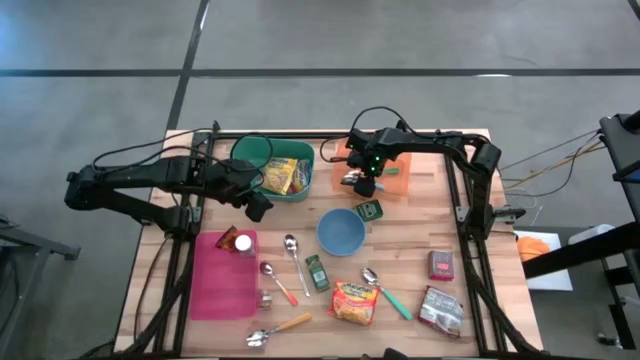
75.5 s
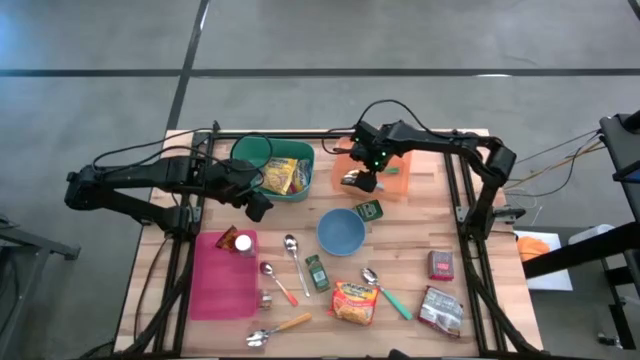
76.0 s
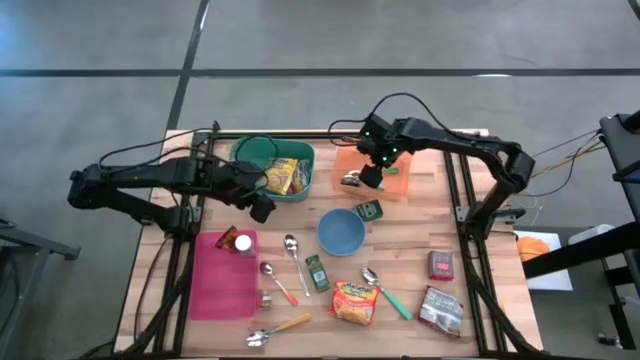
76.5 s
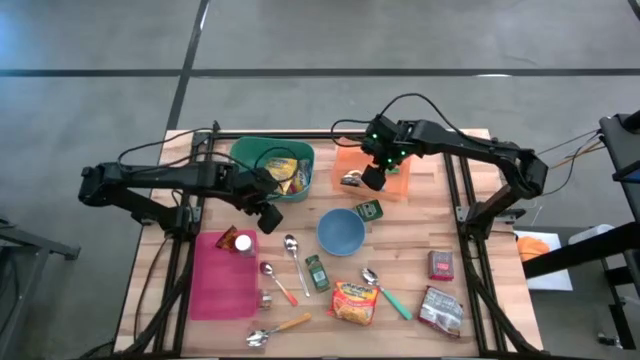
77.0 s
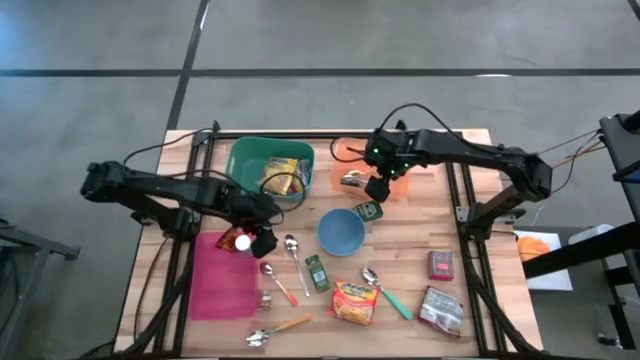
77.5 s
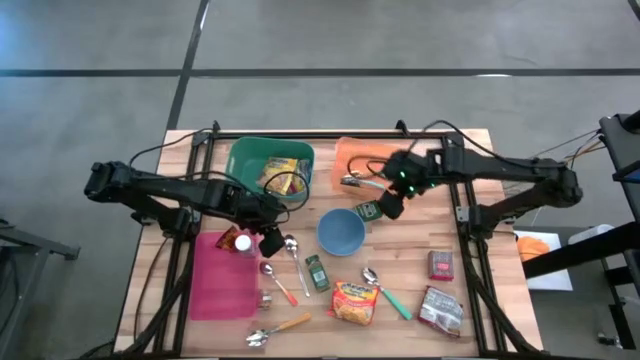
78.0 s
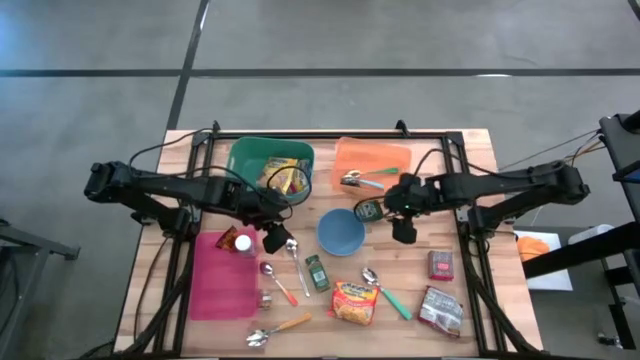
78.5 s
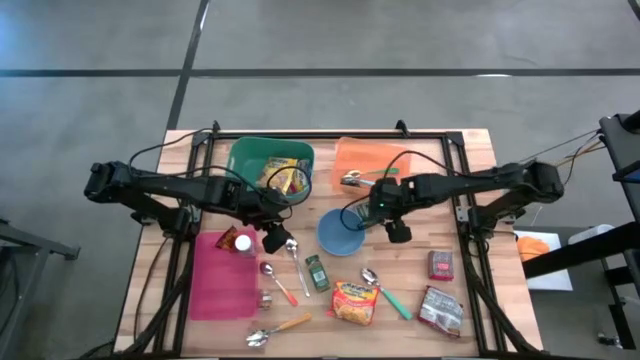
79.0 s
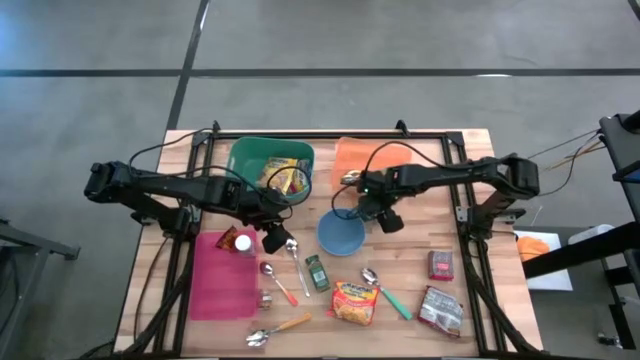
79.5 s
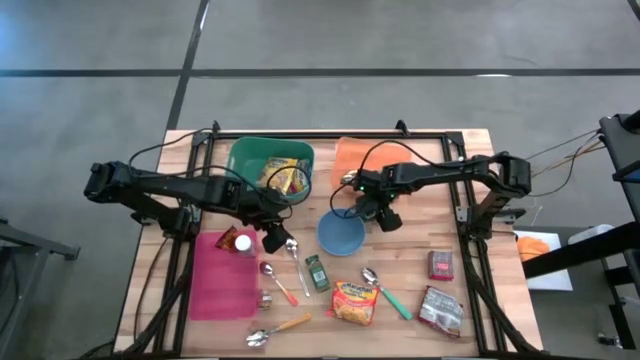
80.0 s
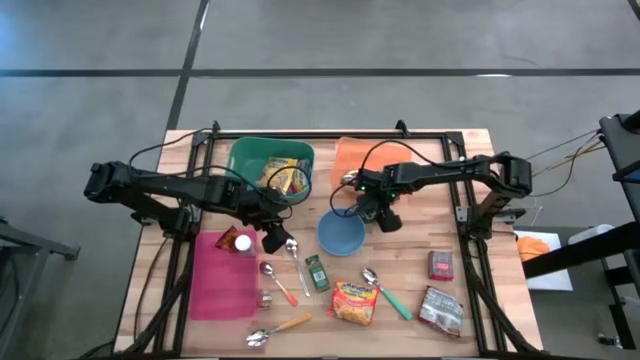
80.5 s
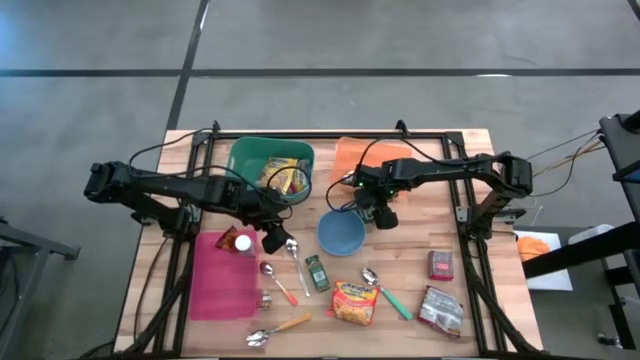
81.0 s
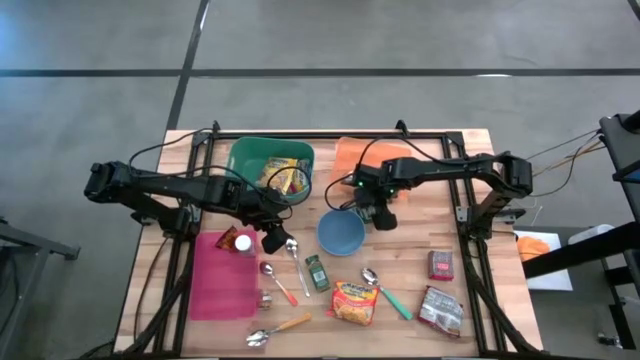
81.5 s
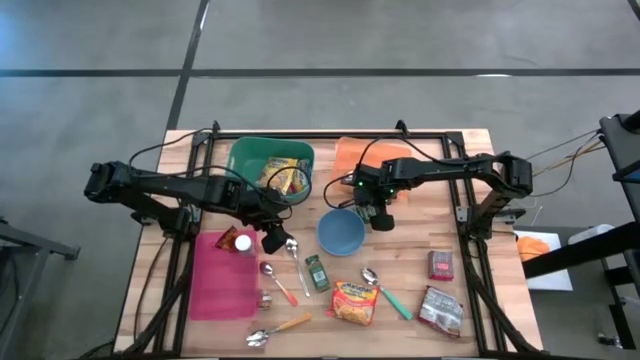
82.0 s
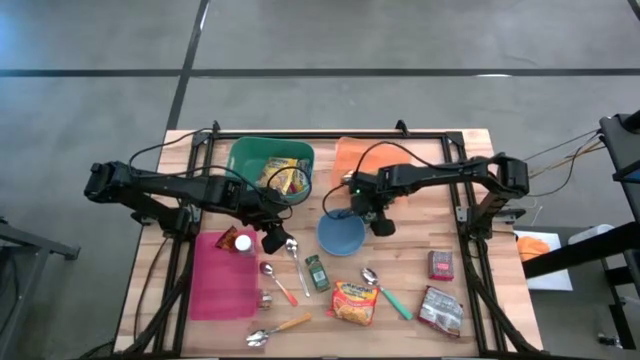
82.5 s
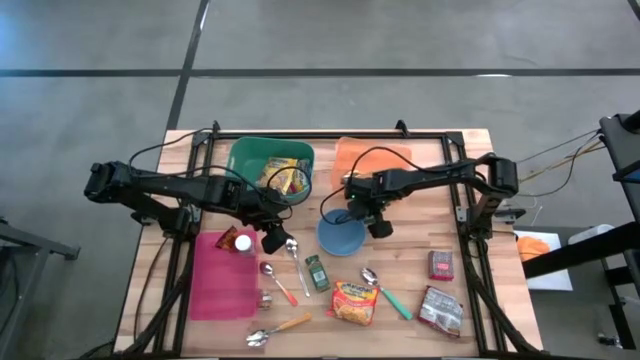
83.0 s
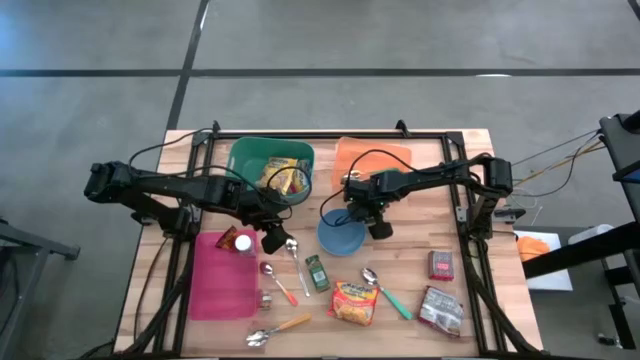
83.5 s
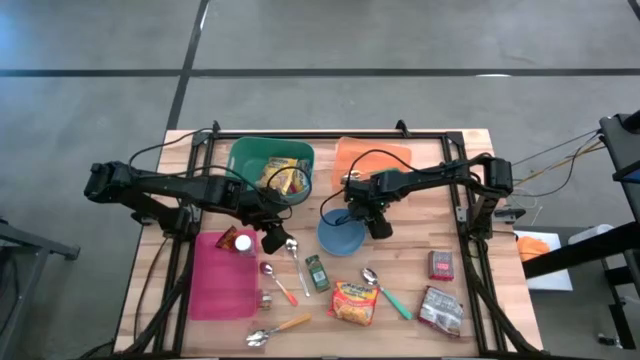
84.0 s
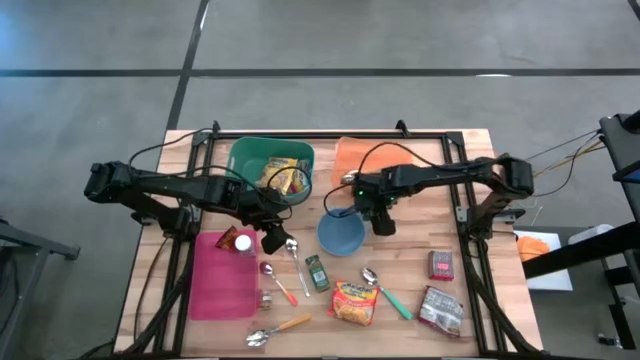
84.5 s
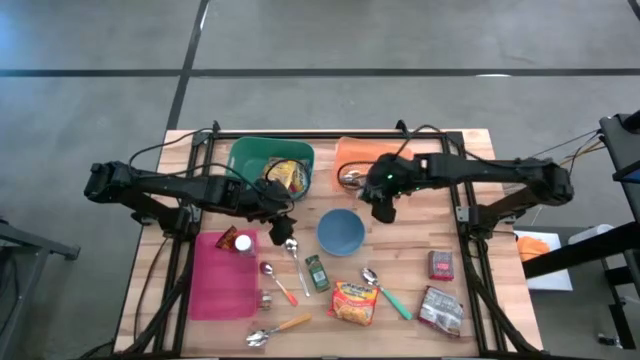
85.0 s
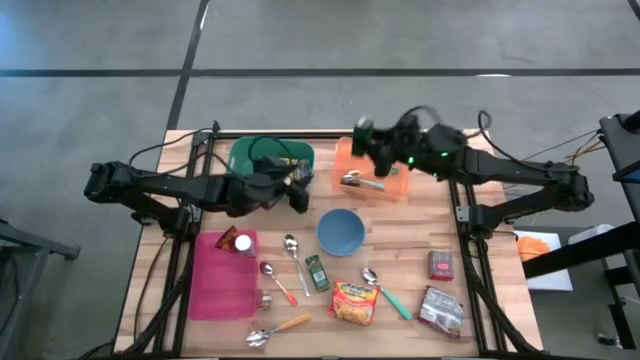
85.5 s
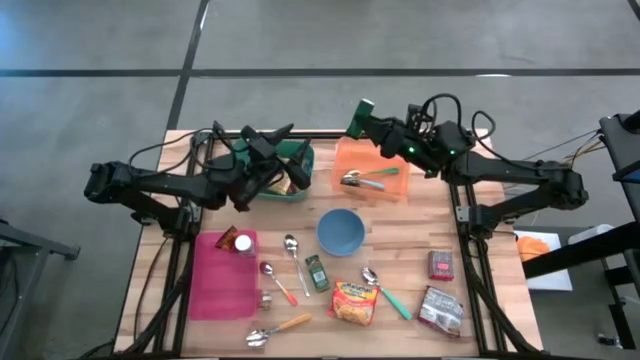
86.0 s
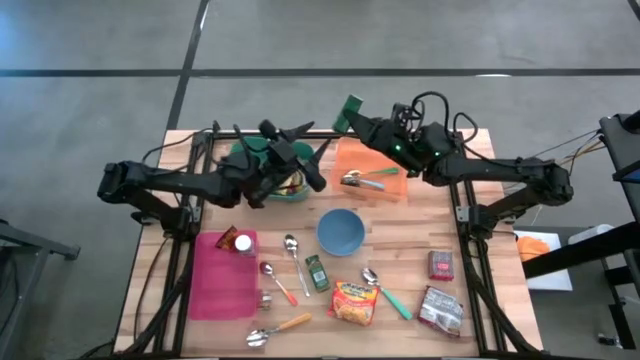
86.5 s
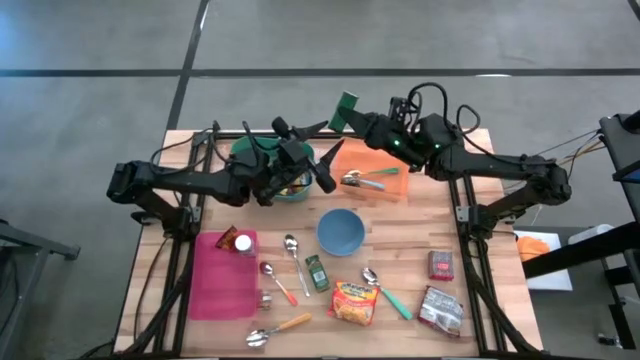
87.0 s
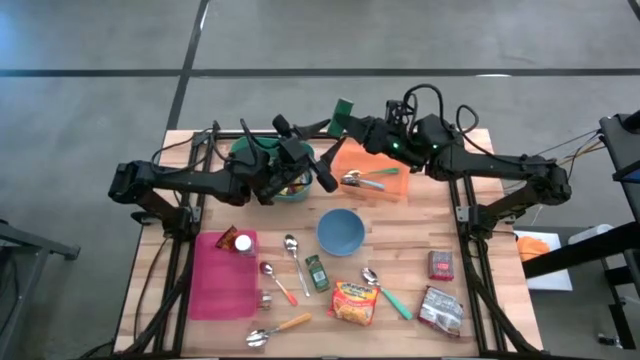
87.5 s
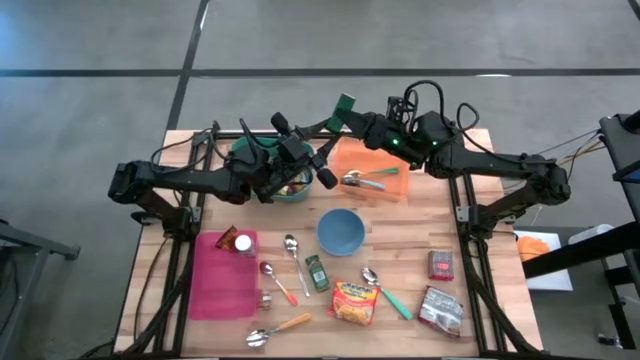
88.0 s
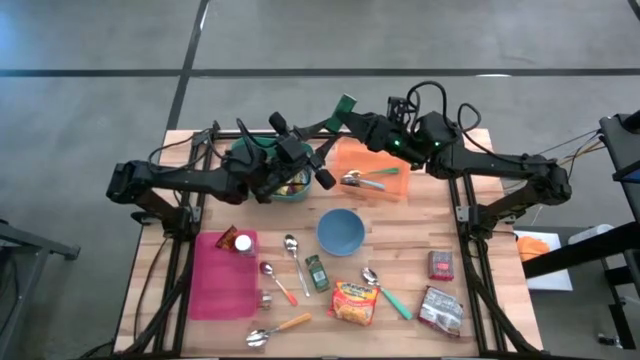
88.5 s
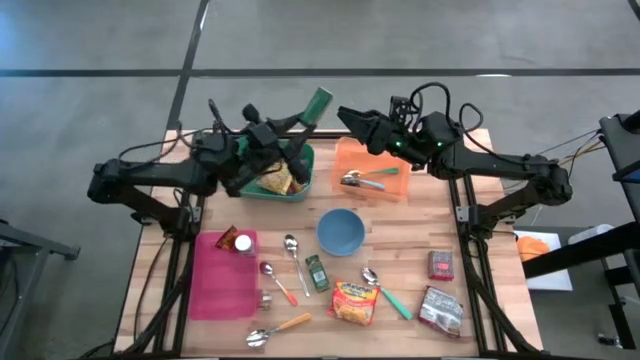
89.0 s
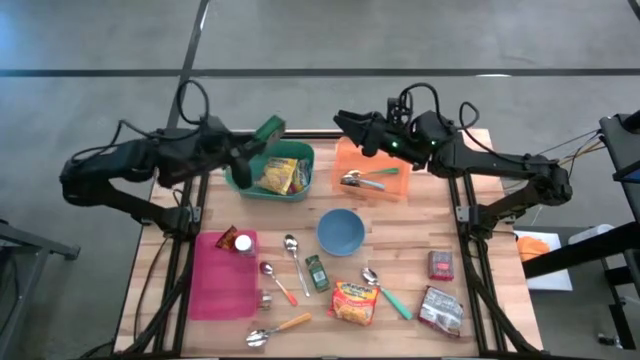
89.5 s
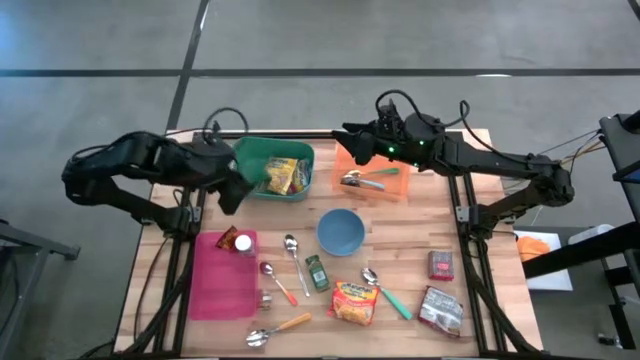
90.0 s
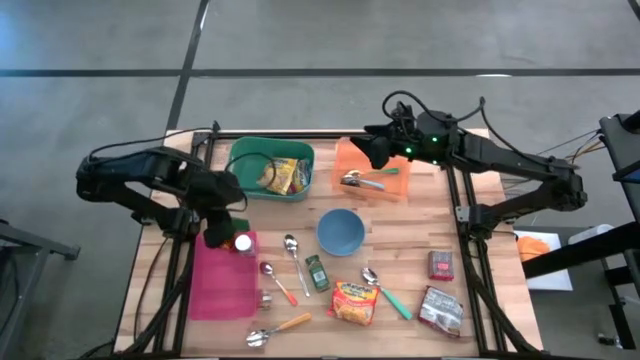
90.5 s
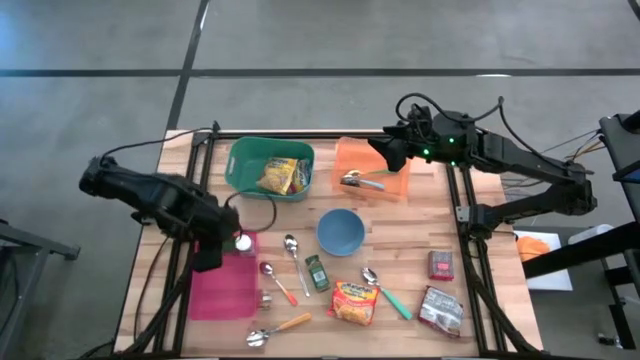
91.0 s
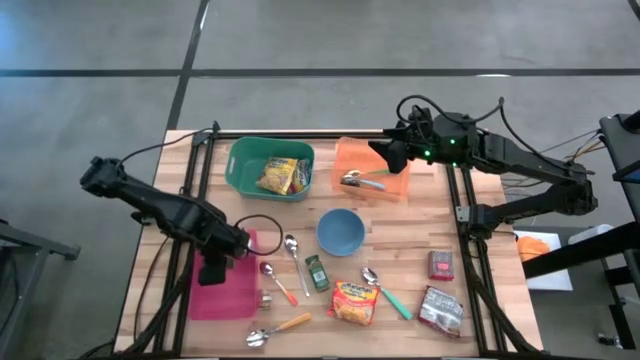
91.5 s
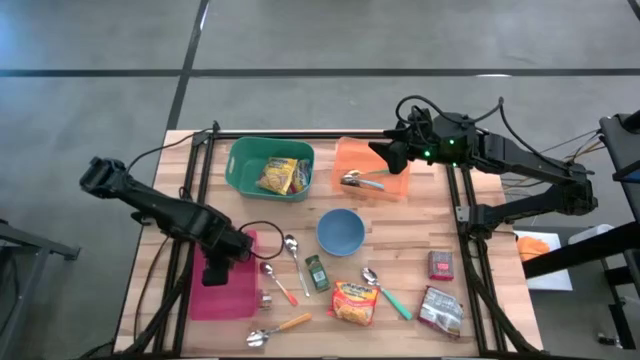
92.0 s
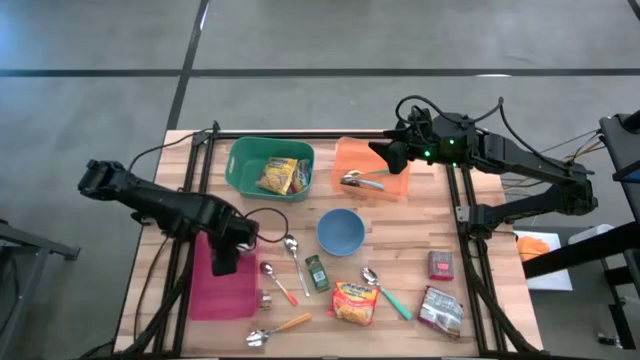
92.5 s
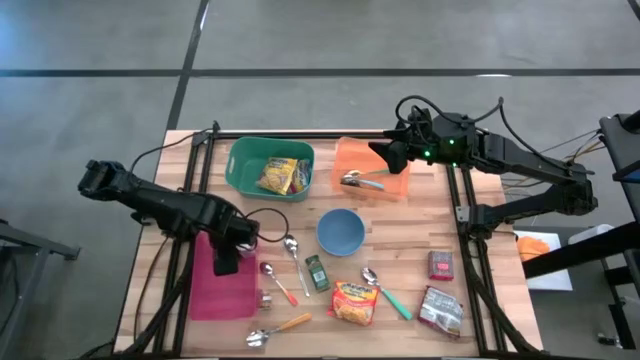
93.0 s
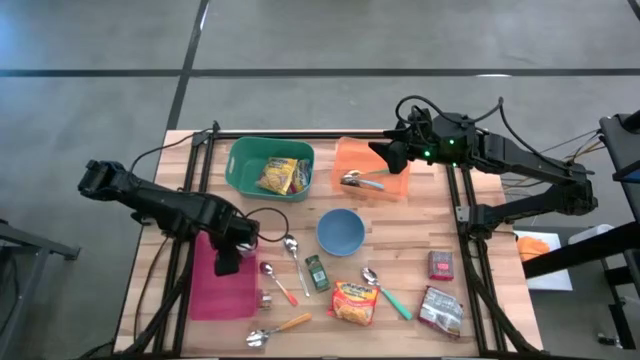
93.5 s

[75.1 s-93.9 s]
Put the green seasoning can into the pink bin

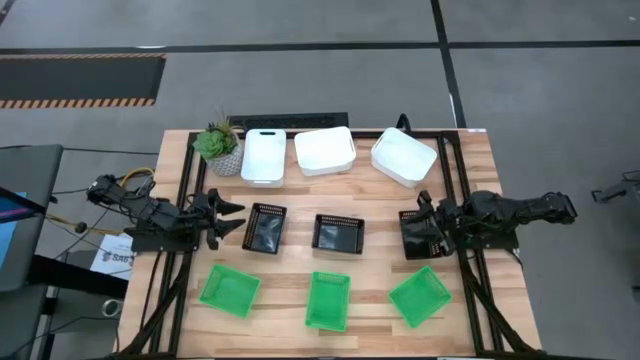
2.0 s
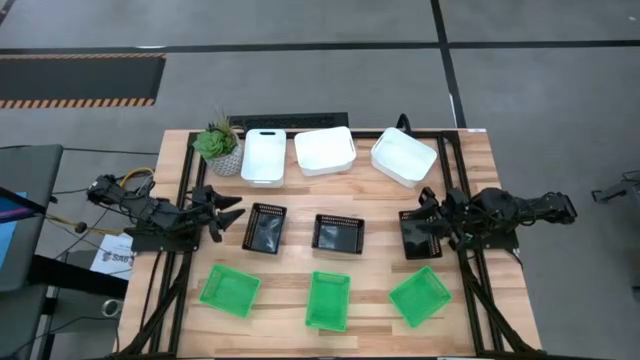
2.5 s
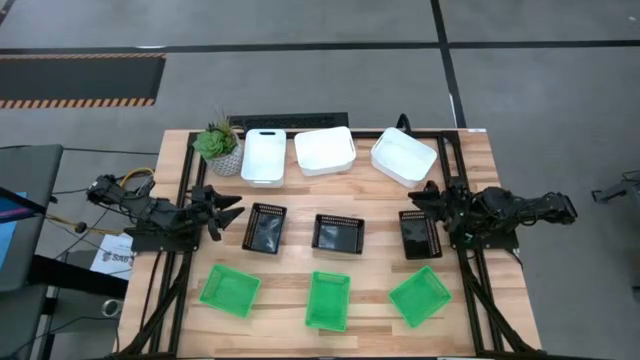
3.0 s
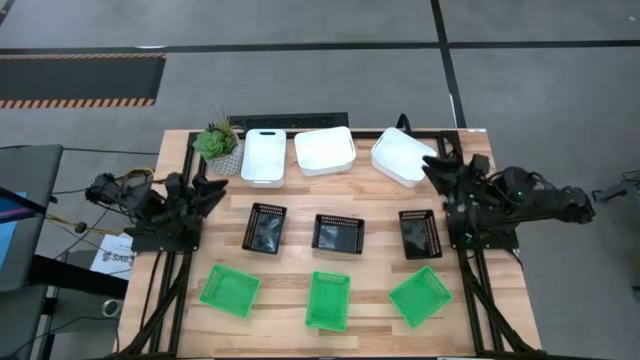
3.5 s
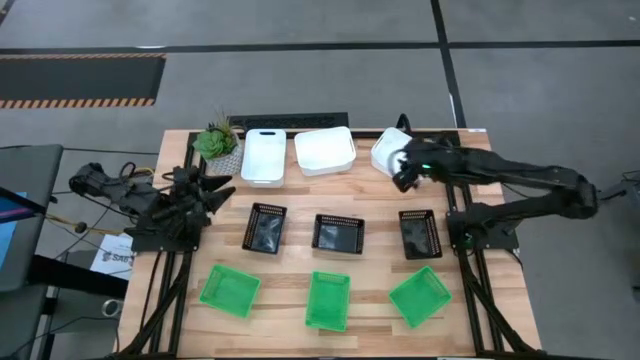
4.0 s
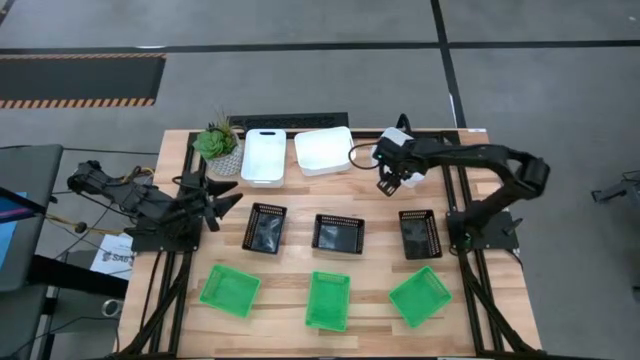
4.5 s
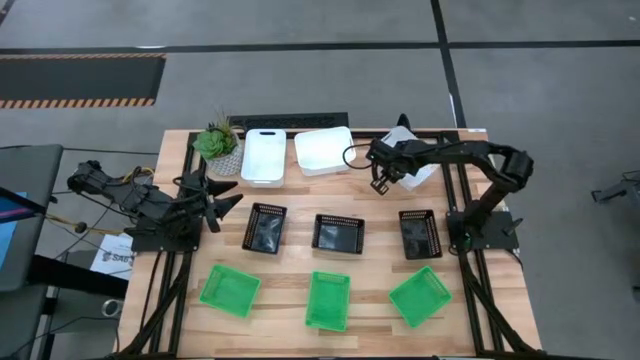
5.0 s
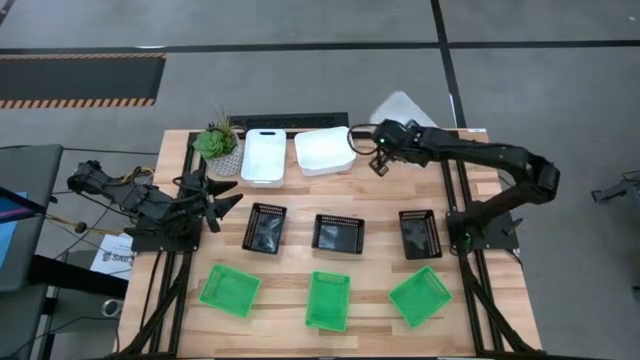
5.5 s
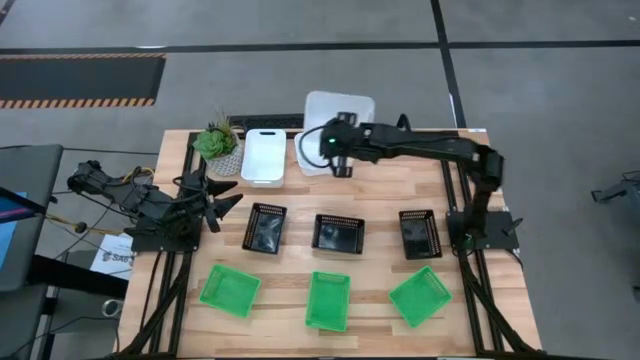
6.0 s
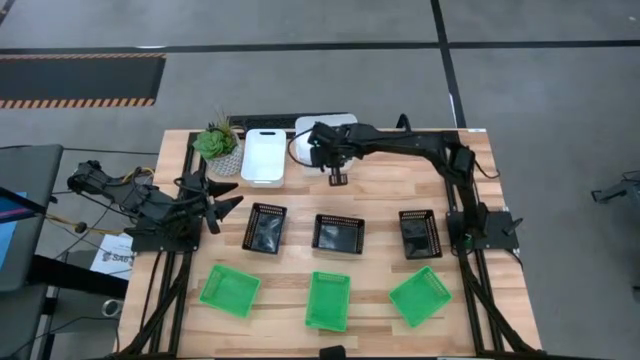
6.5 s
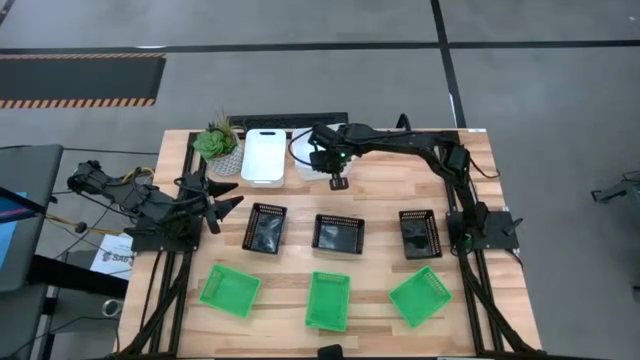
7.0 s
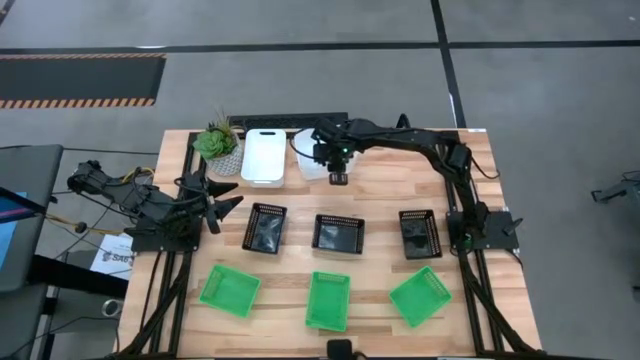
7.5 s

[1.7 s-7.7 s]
Stack the right white bin on top of the center white bin
